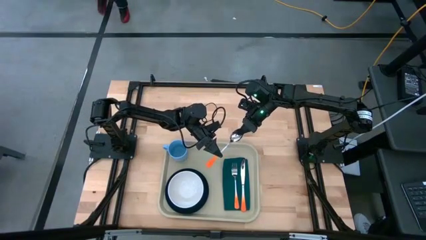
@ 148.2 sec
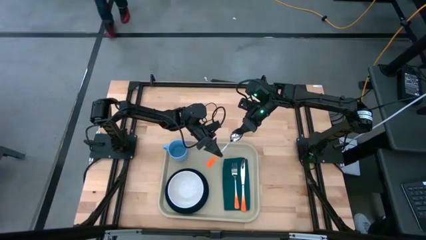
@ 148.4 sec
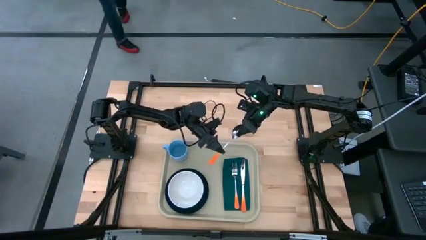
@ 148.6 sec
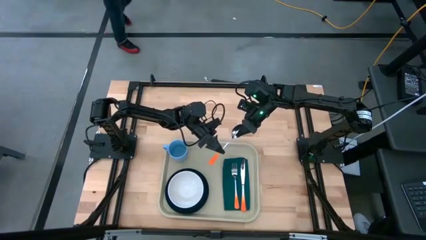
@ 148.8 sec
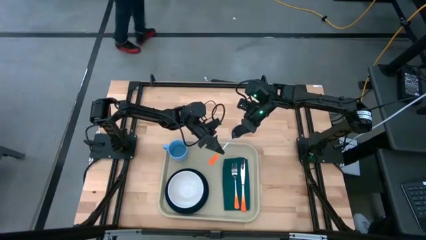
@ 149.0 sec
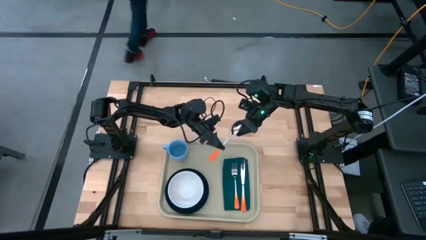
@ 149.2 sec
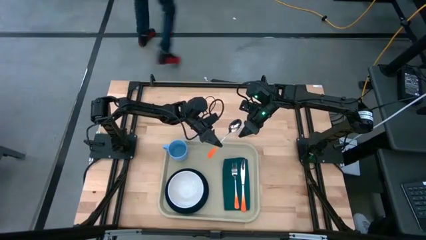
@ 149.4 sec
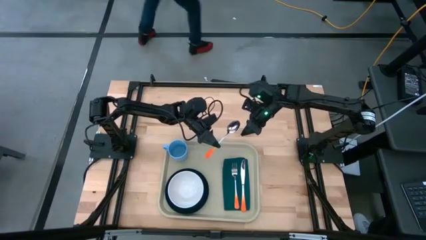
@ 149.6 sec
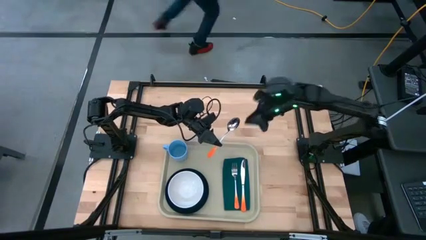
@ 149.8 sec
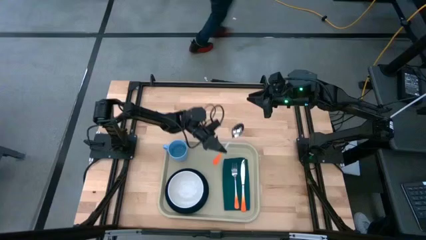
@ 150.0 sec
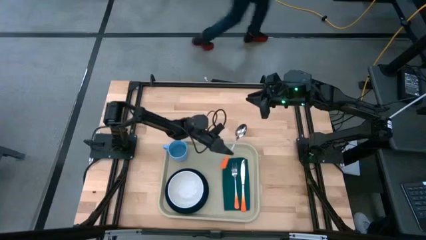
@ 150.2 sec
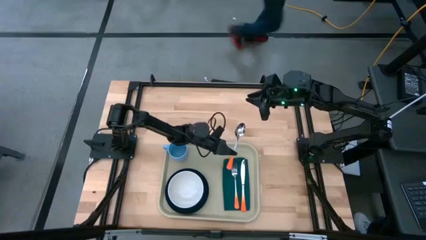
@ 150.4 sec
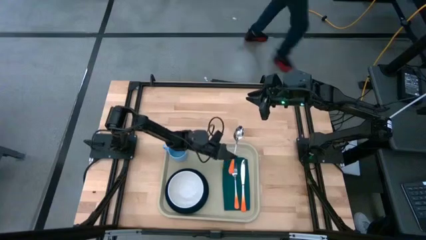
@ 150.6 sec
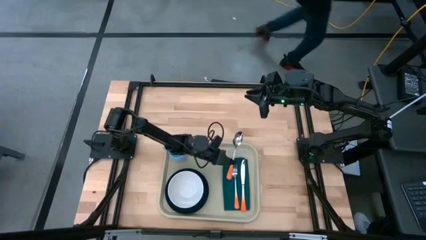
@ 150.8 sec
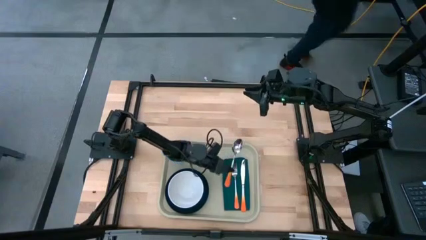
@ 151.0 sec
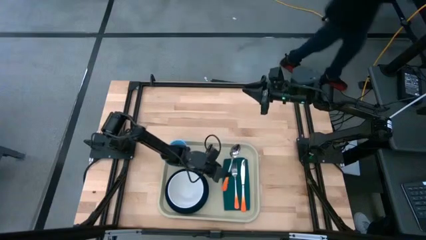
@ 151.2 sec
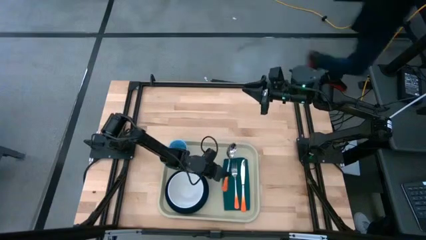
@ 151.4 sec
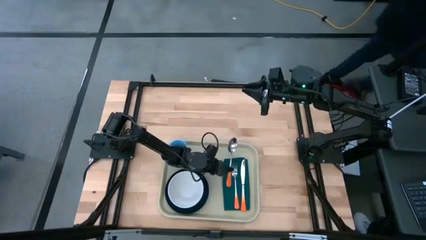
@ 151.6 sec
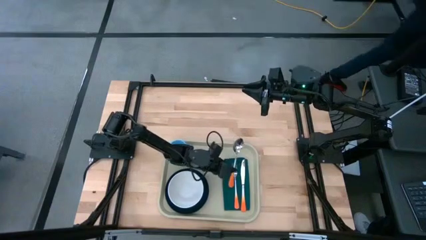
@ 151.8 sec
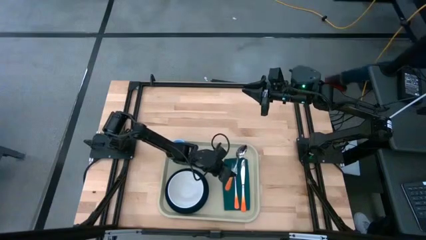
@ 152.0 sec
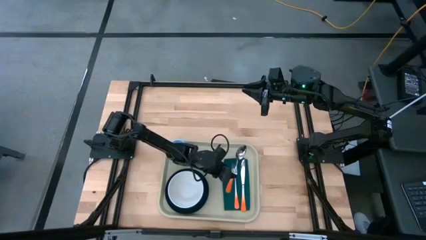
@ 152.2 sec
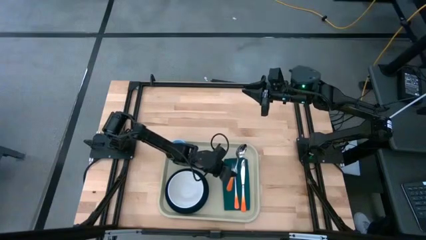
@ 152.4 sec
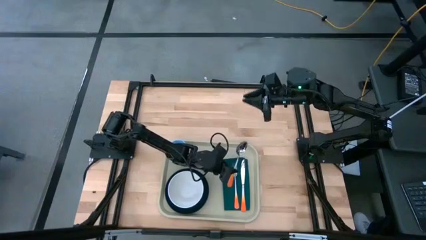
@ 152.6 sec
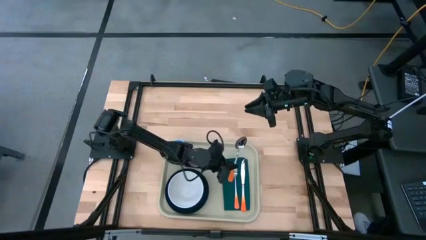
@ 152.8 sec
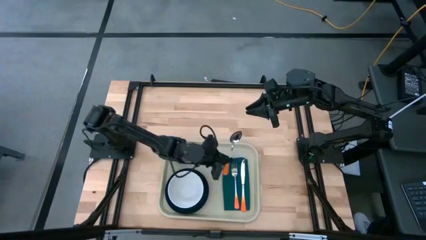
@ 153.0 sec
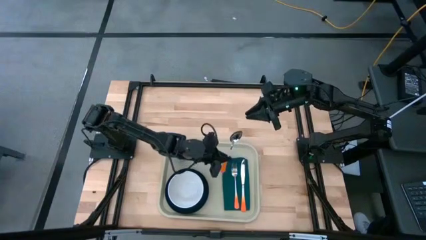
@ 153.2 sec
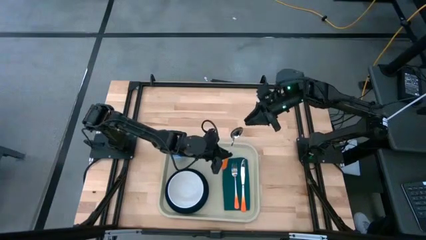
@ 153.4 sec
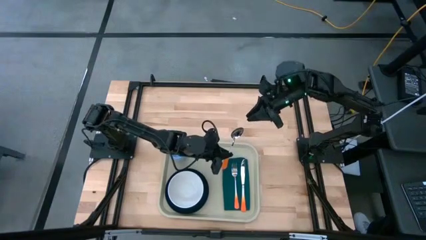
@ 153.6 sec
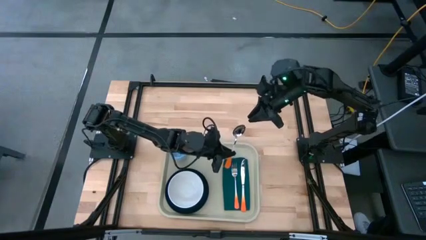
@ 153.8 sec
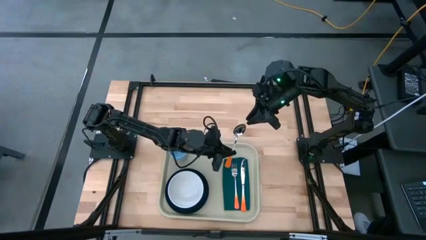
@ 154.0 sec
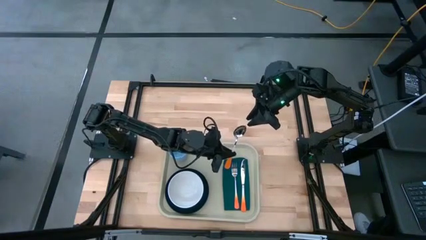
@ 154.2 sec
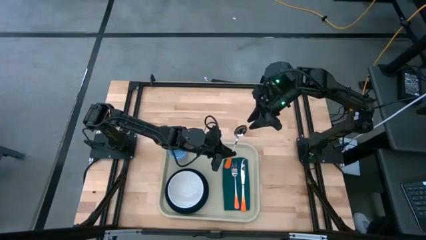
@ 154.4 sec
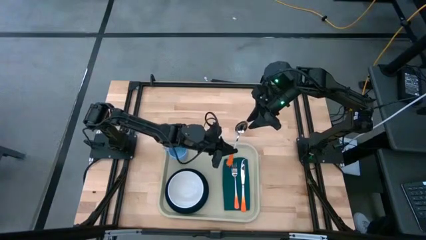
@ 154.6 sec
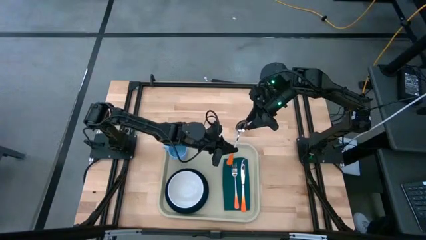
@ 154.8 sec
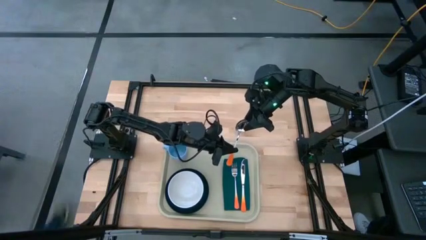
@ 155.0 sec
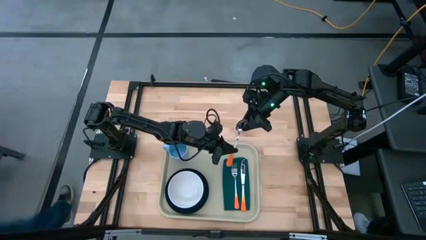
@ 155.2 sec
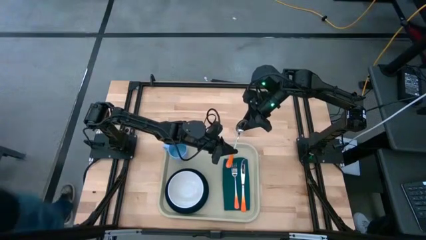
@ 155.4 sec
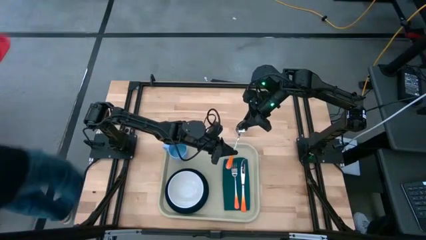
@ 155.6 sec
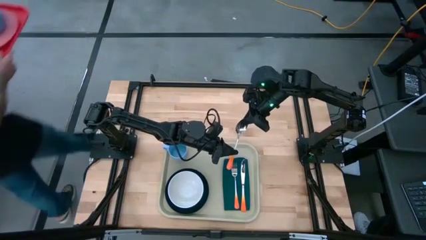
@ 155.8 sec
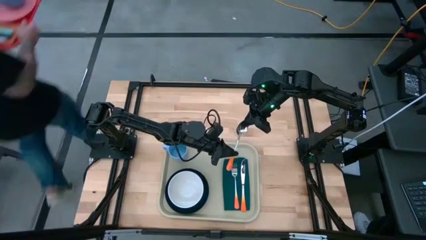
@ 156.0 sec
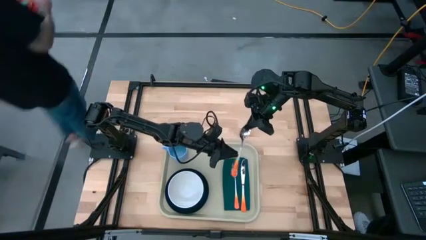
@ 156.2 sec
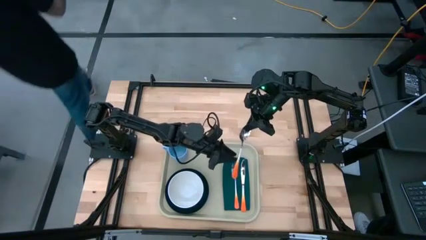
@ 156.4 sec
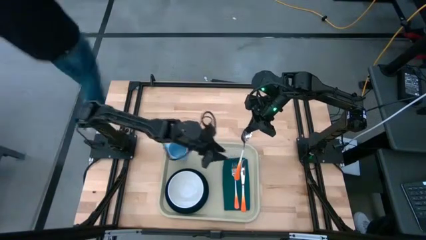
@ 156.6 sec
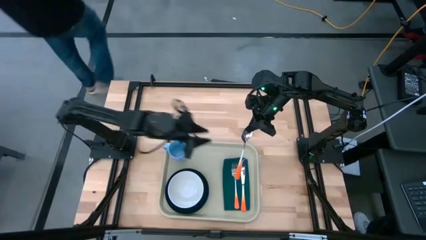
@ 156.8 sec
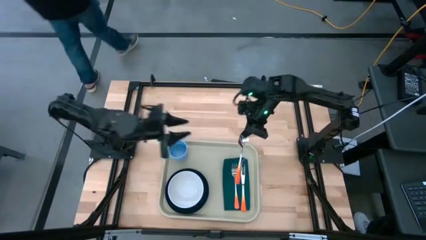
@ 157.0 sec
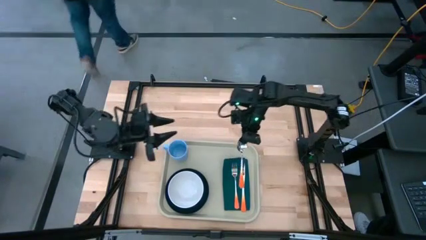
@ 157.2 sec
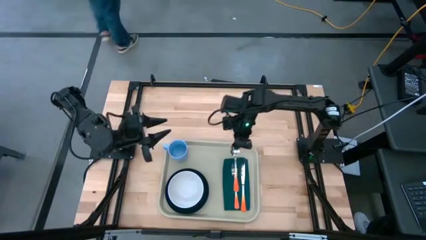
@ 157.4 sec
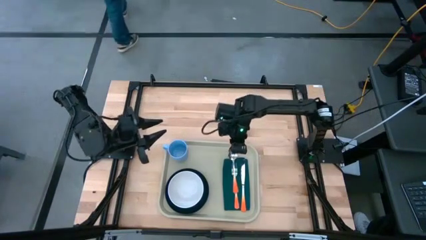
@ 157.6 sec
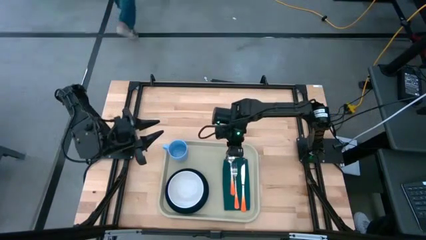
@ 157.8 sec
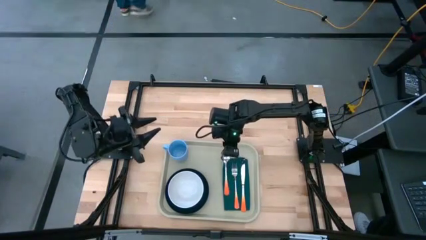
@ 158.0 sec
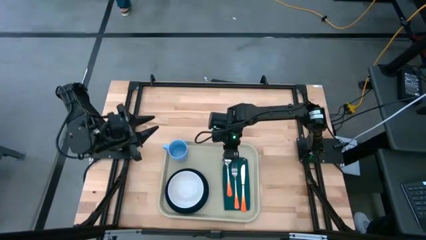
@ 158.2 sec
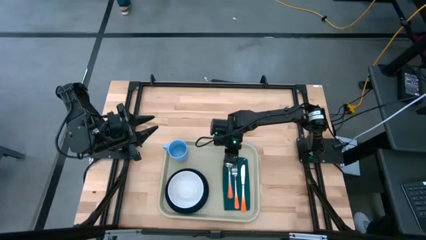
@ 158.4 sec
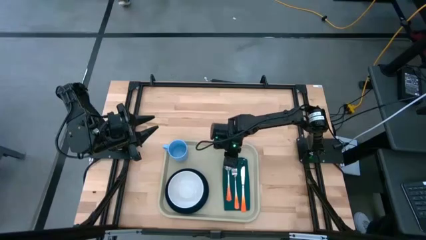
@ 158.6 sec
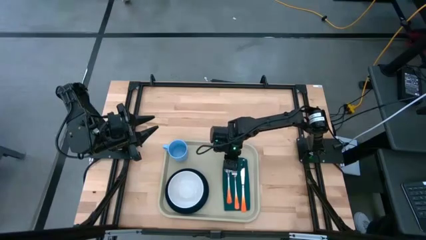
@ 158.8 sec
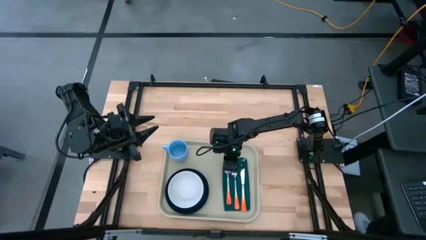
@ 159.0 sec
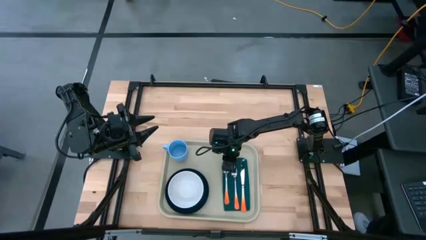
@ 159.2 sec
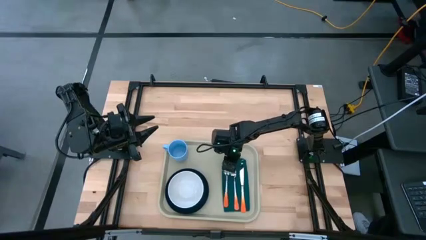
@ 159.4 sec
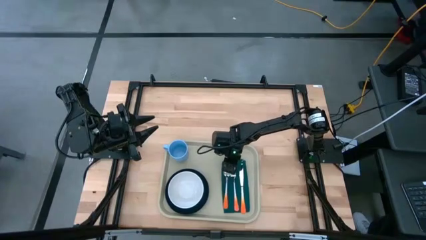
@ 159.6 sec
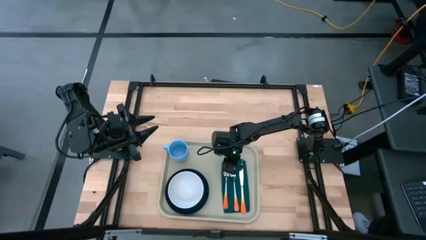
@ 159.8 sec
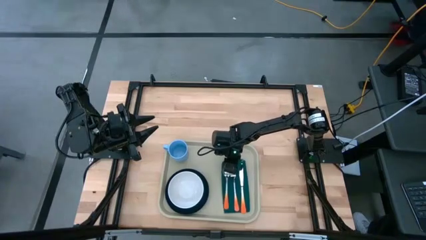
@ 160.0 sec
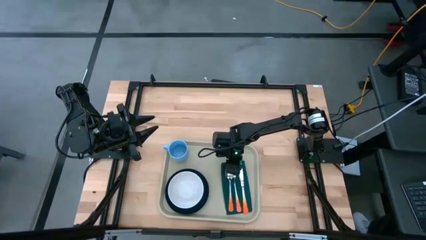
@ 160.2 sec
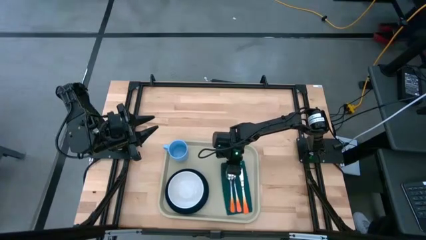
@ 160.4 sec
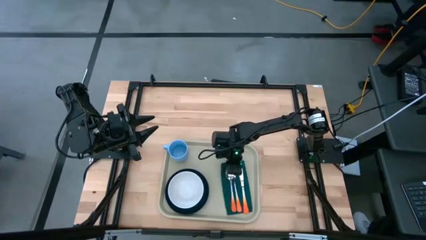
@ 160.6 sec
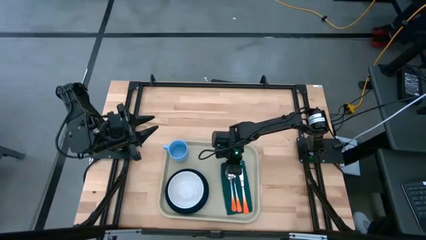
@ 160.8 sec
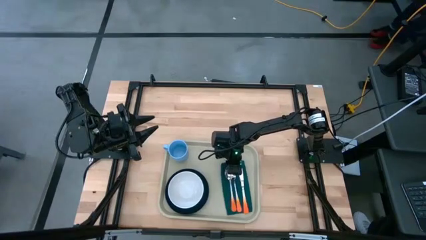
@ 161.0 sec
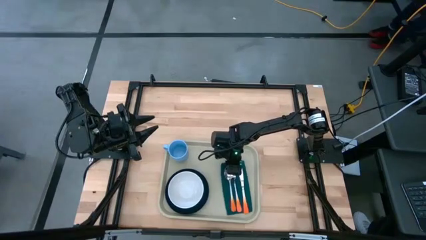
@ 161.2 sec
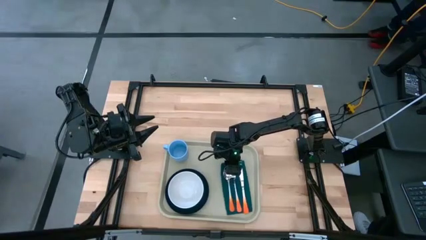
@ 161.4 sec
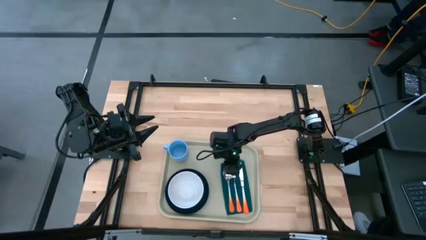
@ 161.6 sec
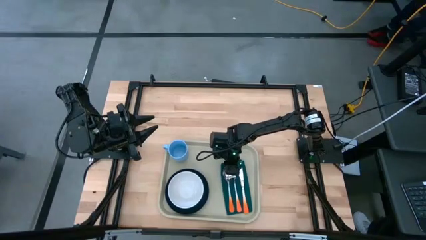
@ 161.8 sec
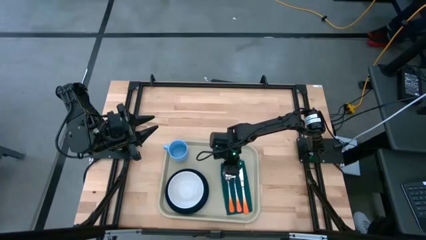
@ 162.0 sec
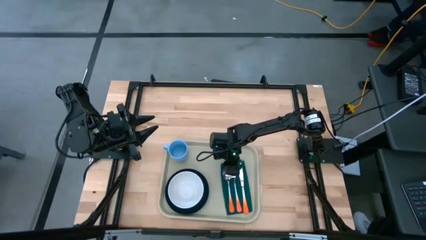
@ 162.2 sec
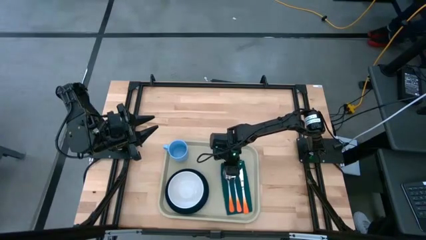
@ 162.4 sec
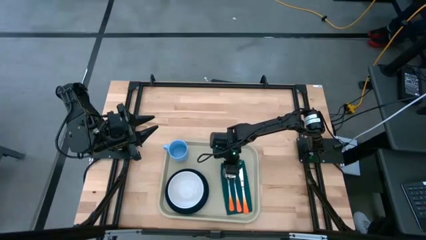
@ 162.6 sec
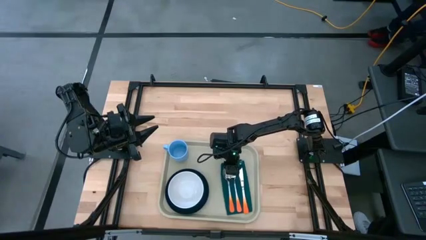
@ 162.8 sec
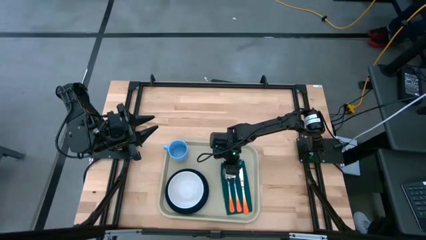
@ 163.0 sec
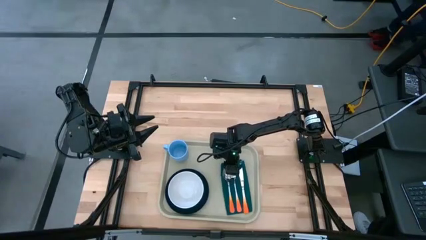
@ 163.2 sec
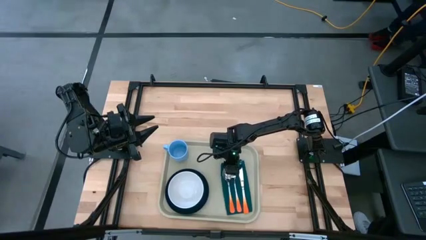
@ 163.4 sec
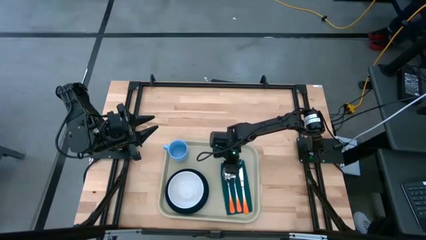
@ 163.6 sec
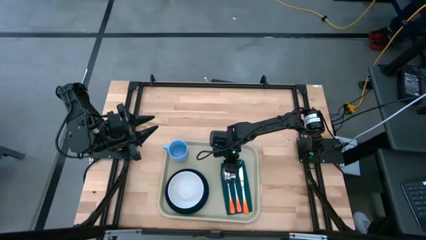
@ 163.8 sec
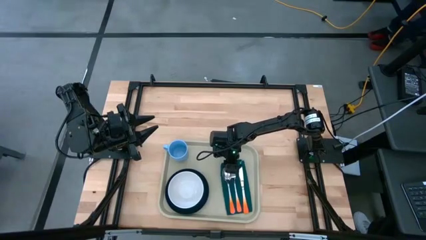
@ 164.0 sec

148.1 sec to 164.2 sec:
Task: Set up tray
Put the orange spoon on top of the napkin to the left of the orange fork
